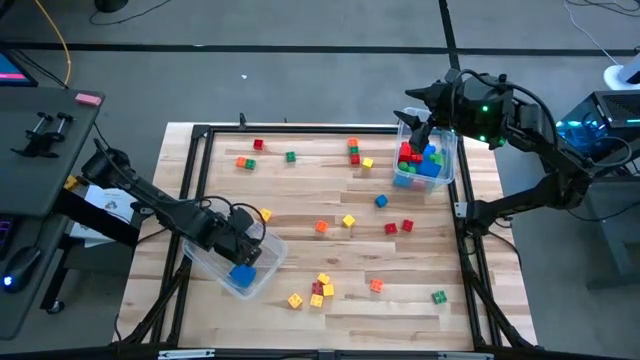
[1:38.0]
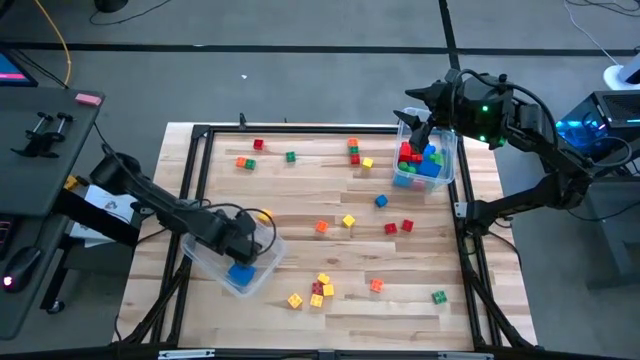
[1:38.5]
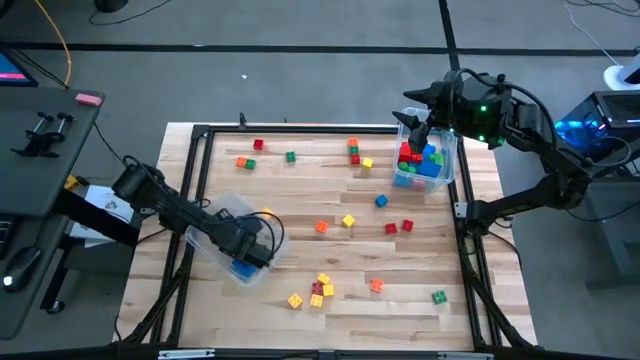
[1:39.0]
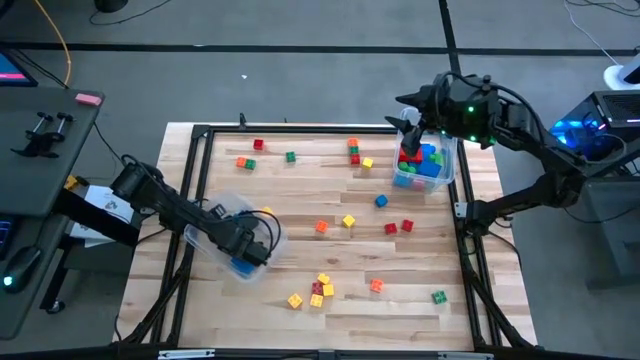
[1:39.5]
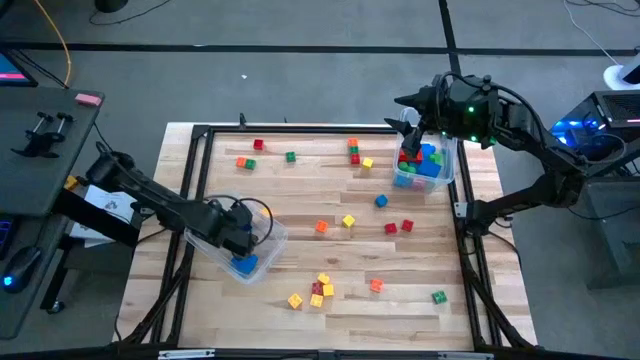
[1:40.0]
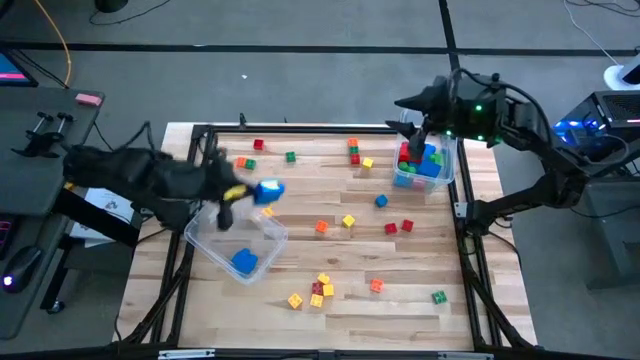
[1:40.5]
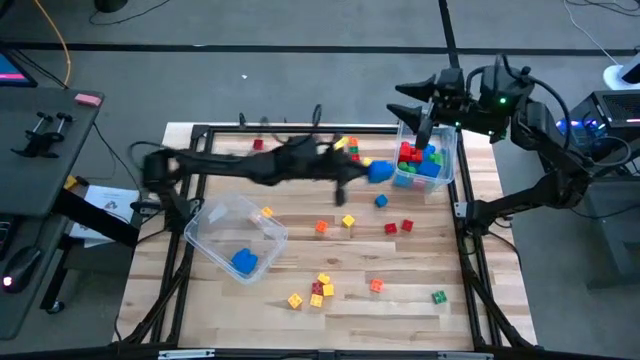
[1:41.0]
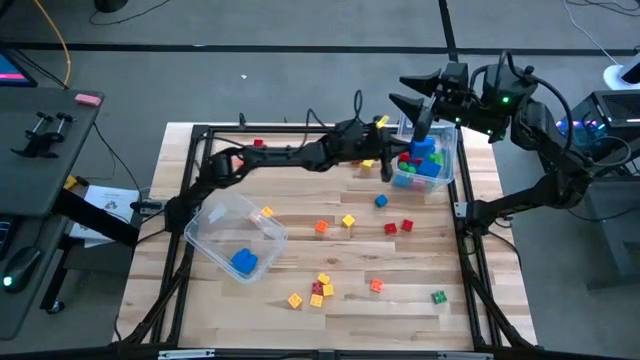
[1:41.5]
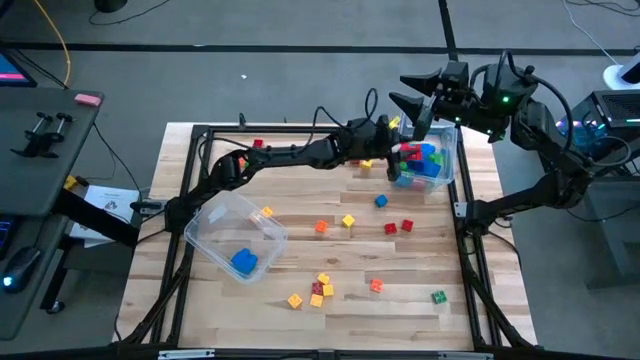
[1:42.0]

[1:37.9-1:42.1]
Task: Sort blocks by size
Put the large blue game piece into the right transparent bin

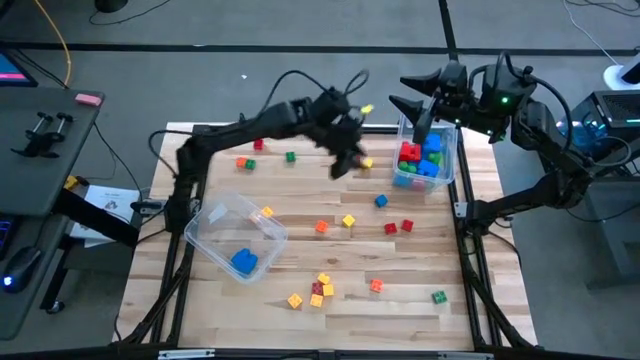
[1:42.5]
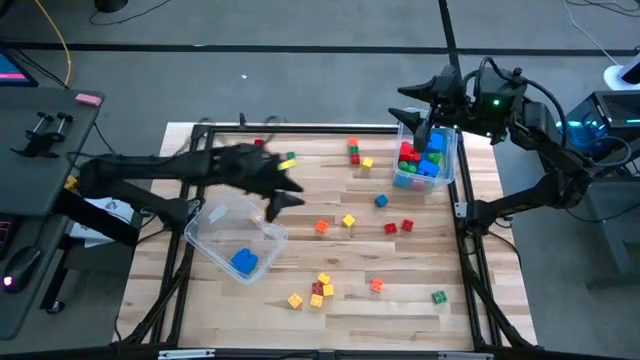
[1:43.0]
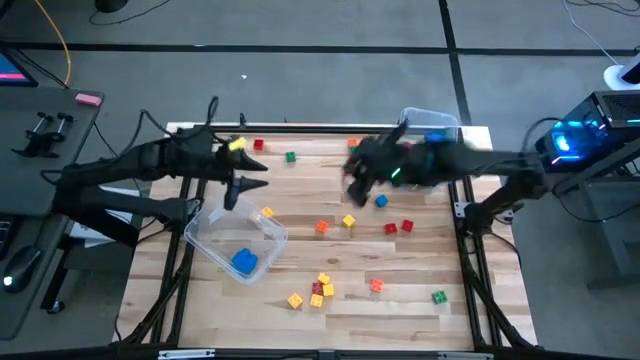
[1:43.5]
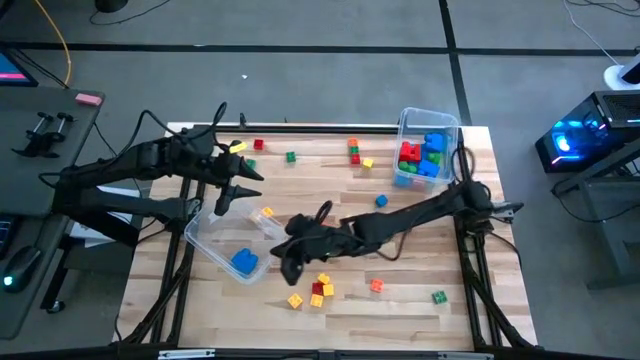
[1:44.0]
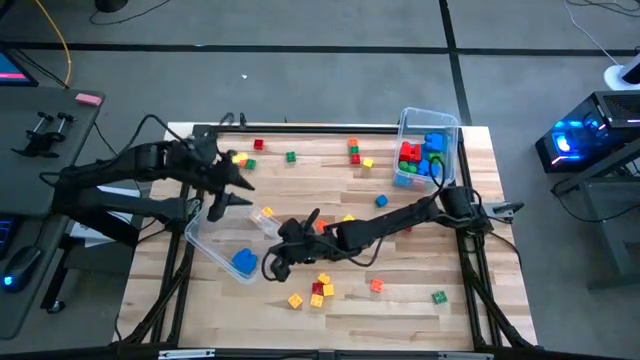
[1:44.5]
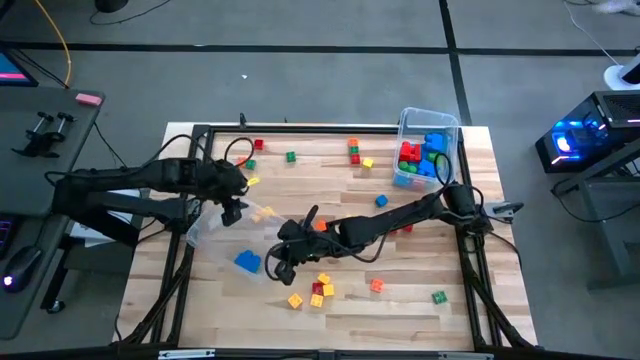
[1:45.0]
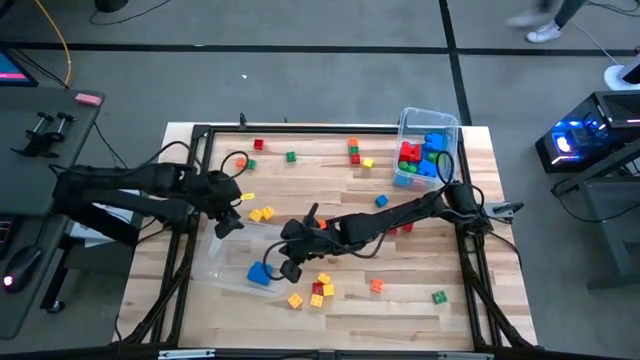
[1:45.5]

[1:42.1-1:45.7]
Adjust the left transparent bin

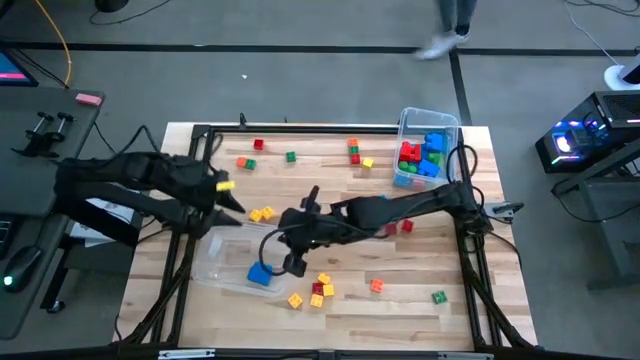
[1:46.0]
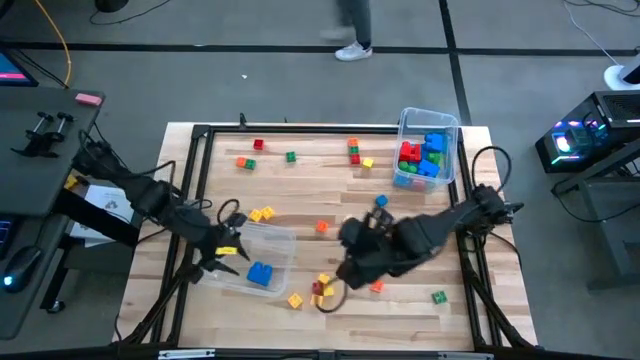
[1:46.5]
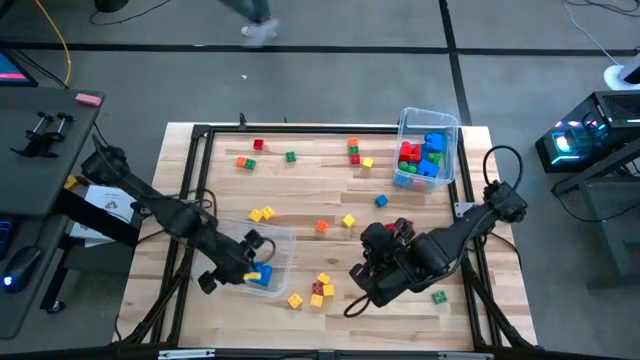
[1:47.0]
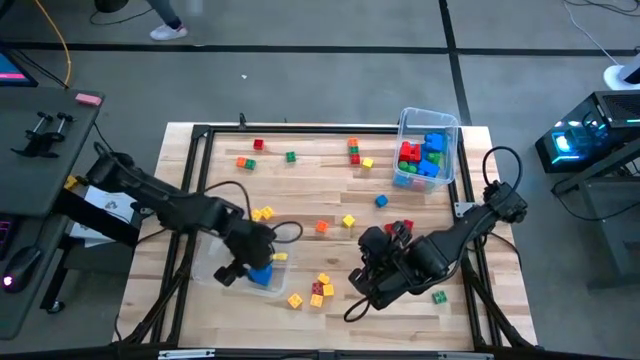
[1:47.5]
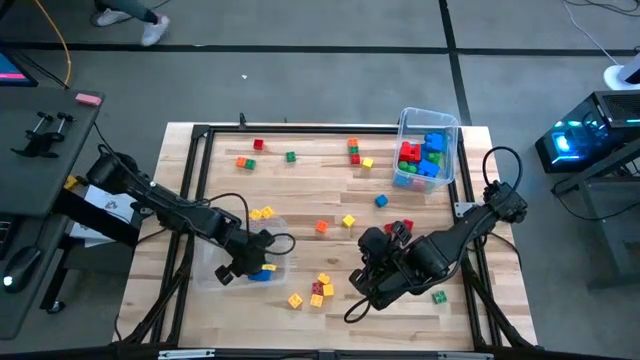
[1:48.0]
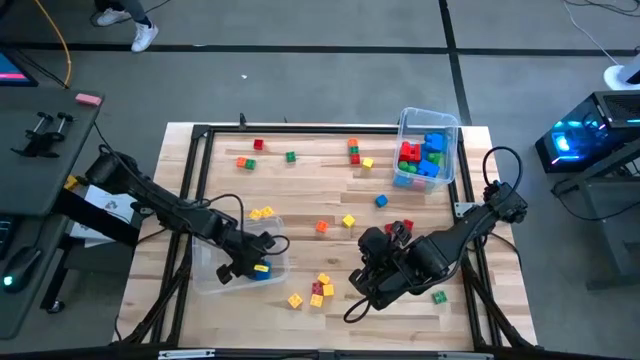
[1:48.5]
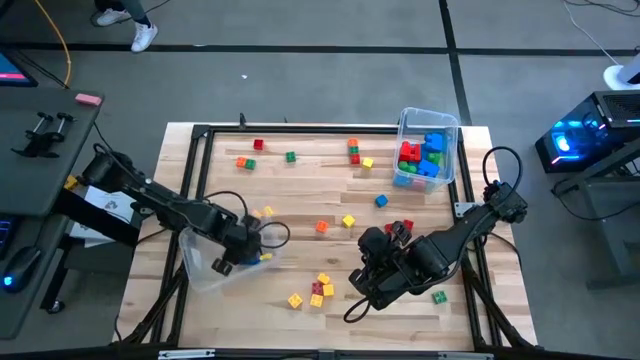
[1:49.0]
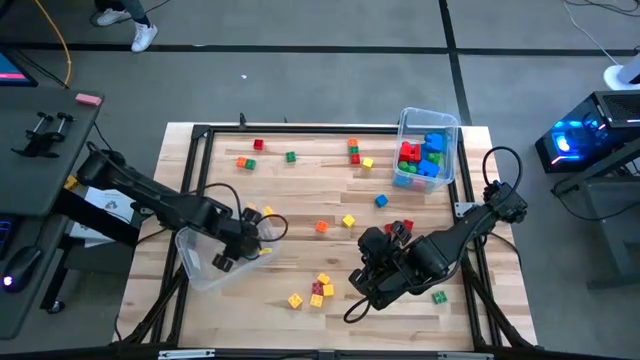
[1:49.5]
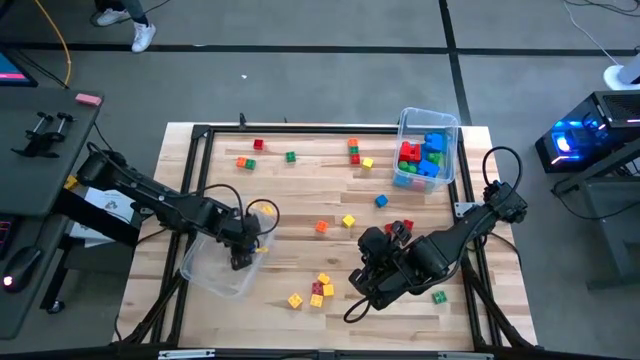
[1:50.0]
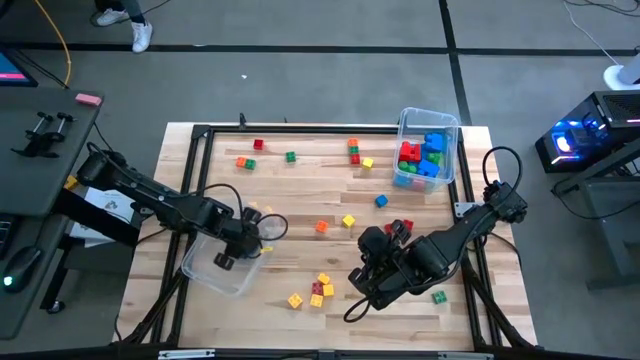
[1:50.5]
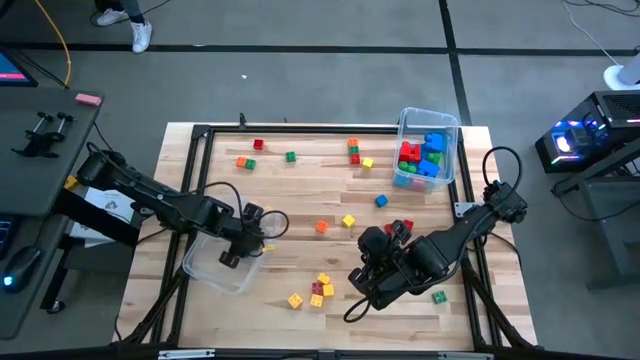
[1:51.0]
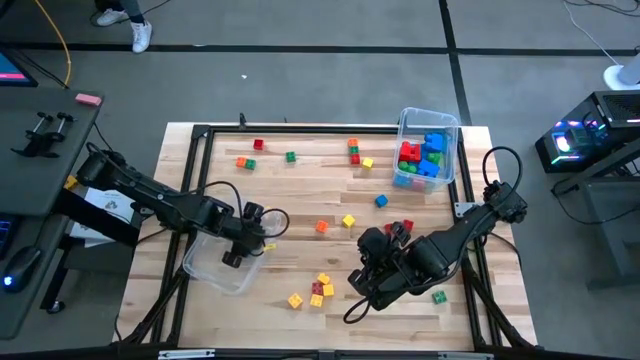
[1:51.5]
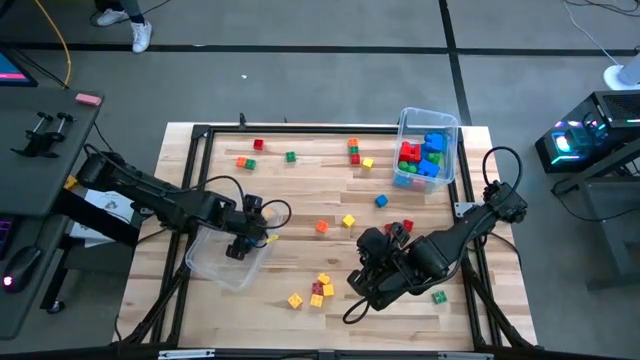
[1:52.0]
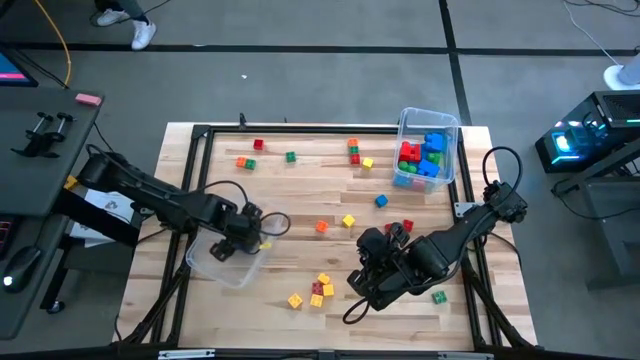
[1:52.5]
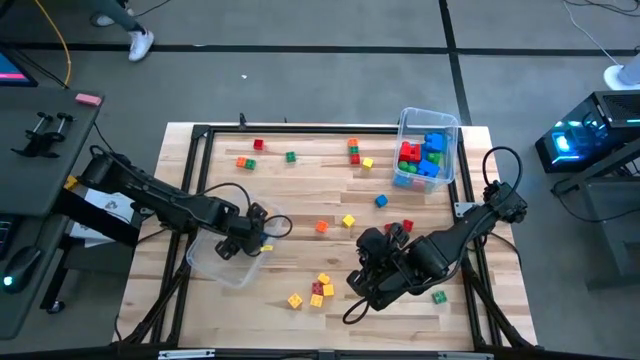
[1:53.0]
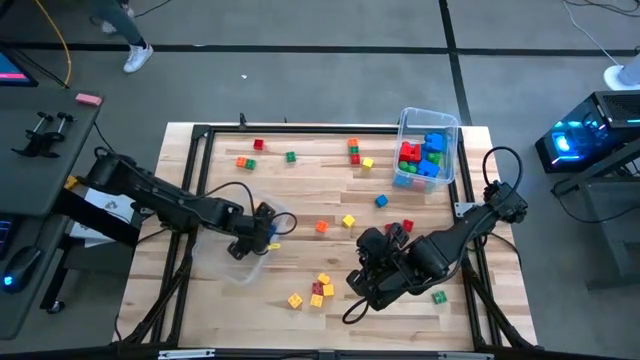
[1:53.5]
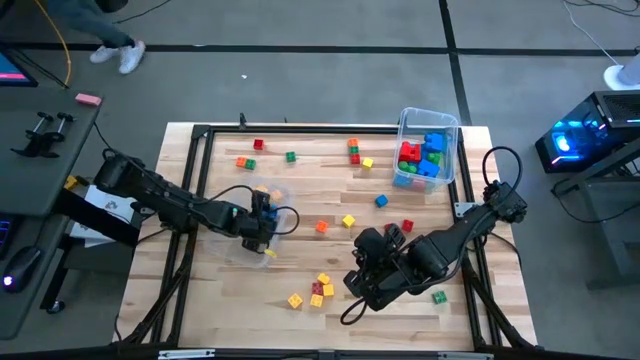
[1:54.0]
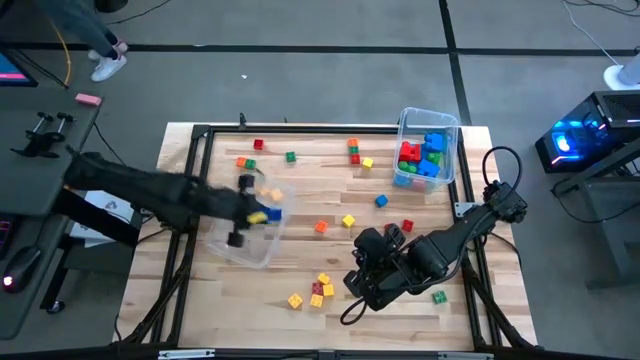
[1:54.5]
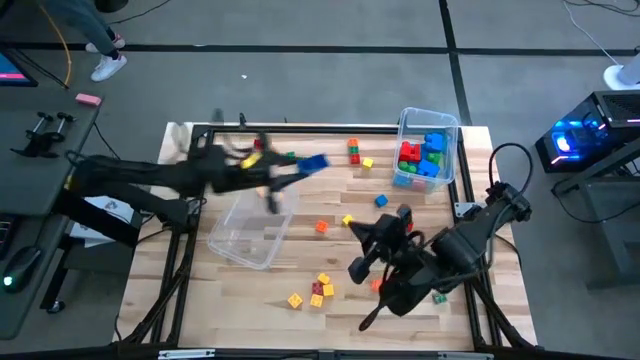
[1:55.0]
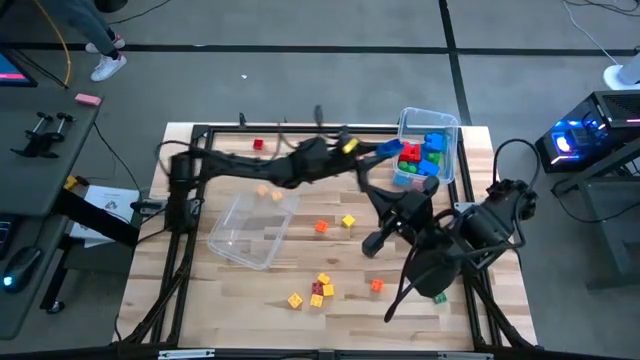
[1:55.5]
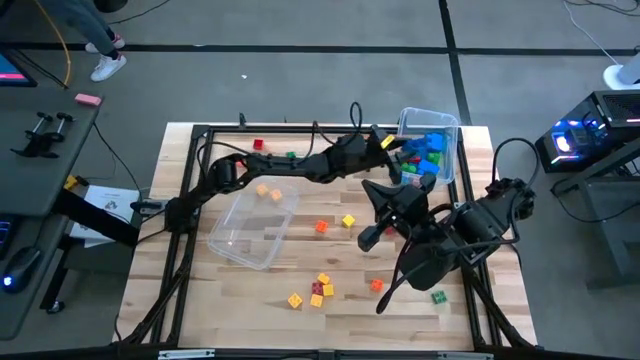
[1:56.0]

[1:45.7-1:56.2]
Put the large blue game piece into the right transparent bin

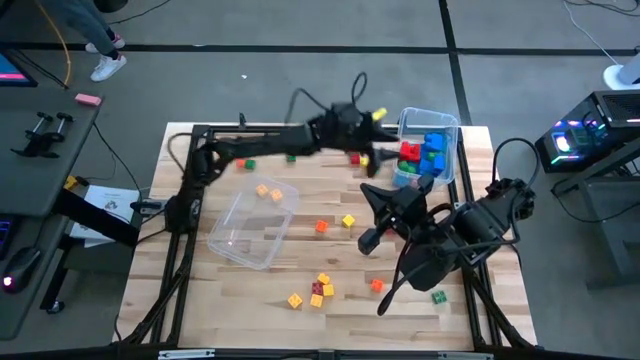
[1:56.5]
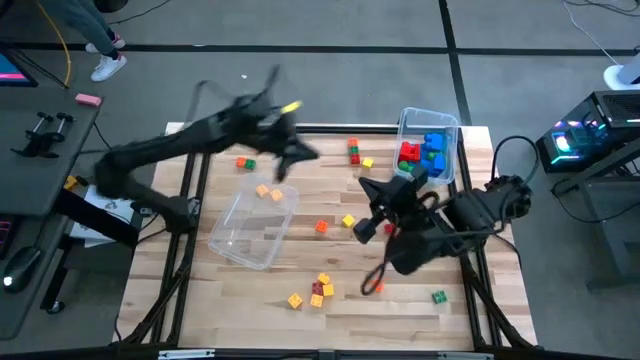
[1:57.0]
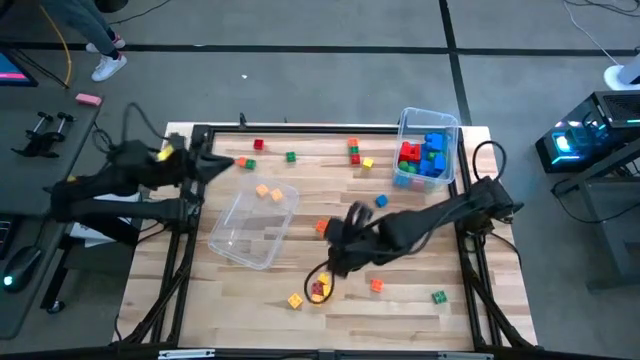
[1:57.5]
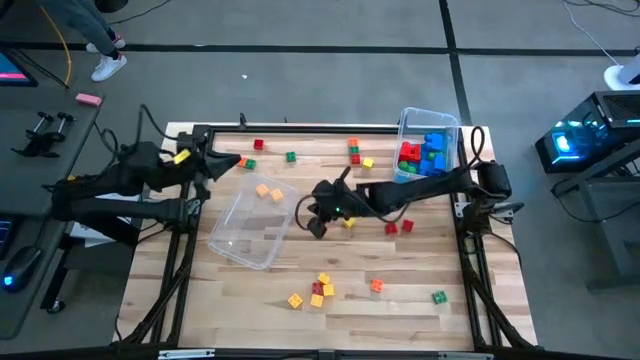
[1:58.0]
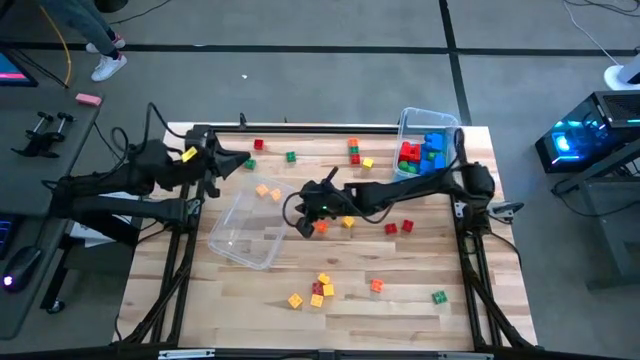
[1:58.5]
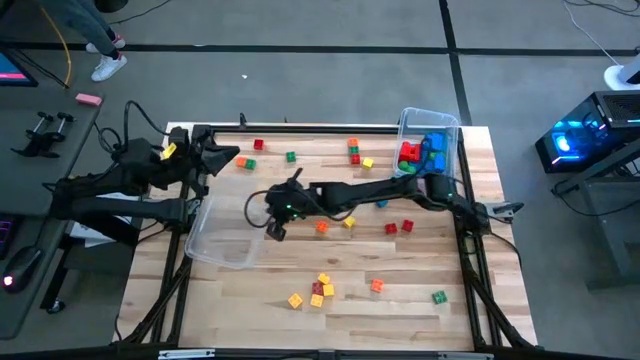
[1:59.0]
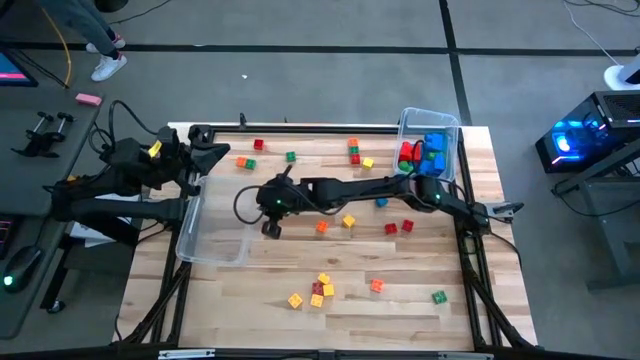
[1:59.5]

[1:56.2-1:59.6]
Adjust the left transparent bin
